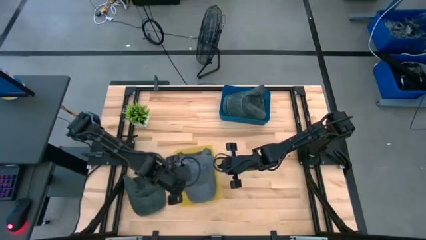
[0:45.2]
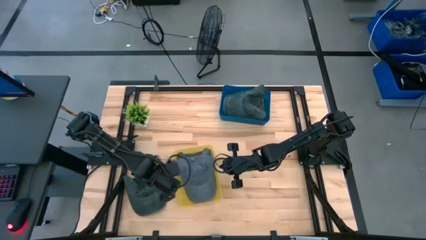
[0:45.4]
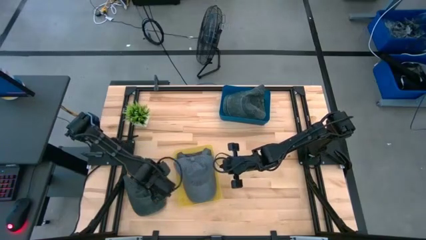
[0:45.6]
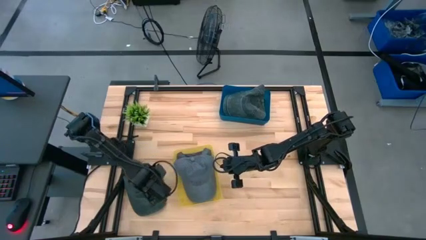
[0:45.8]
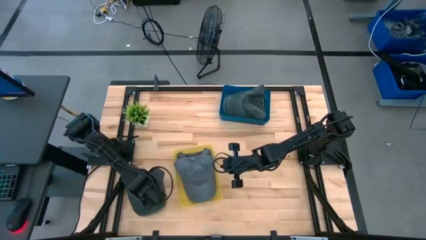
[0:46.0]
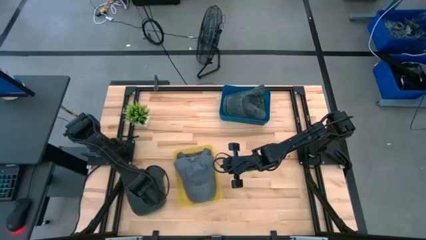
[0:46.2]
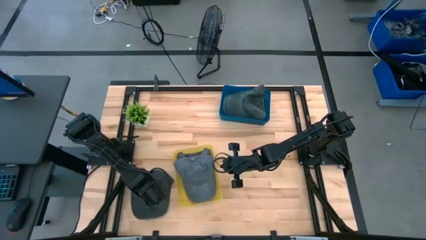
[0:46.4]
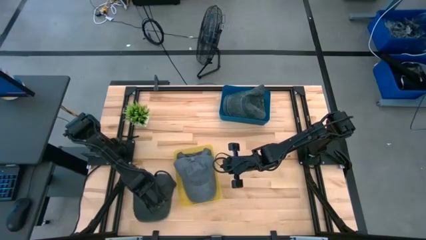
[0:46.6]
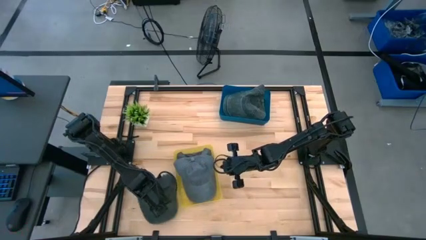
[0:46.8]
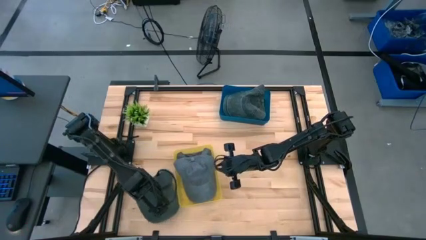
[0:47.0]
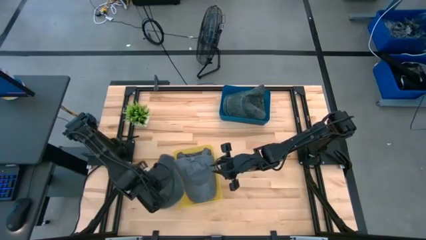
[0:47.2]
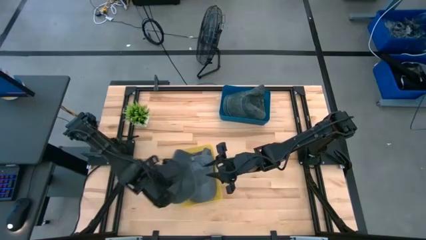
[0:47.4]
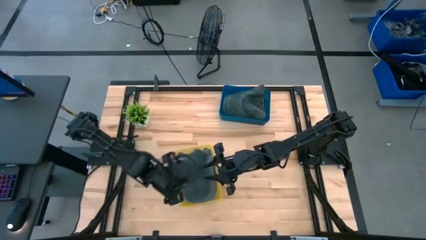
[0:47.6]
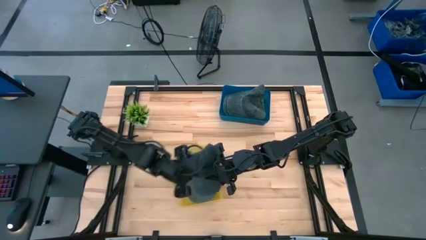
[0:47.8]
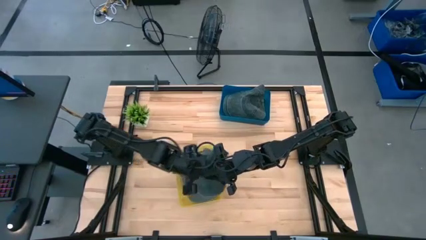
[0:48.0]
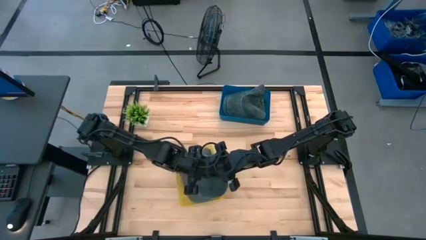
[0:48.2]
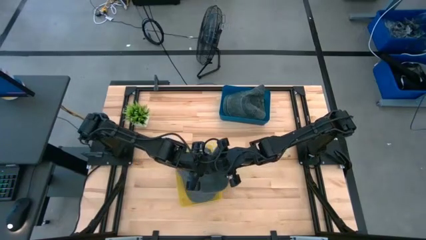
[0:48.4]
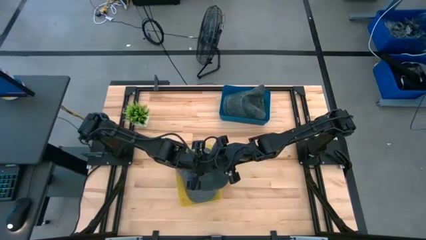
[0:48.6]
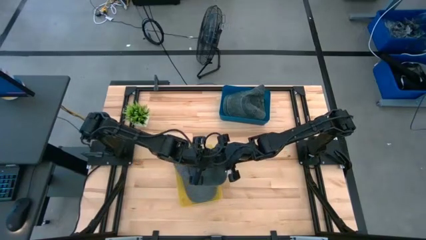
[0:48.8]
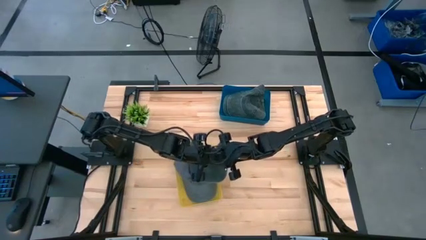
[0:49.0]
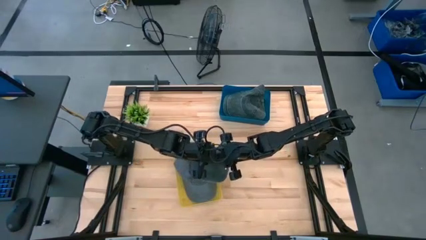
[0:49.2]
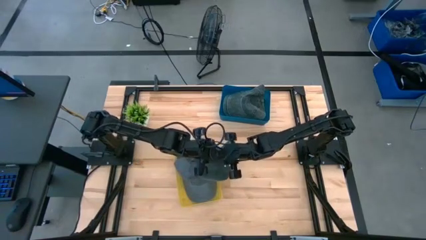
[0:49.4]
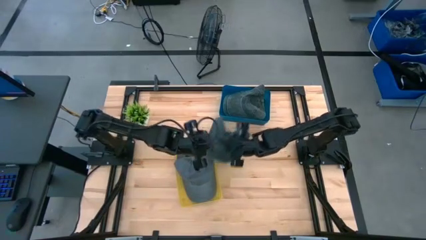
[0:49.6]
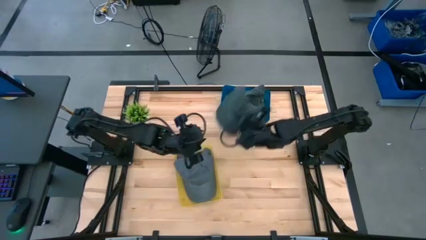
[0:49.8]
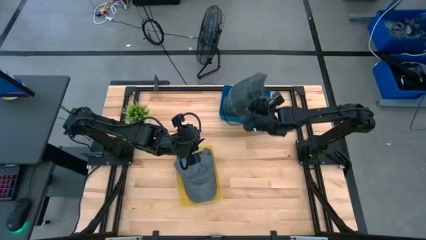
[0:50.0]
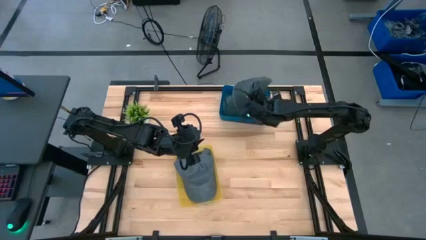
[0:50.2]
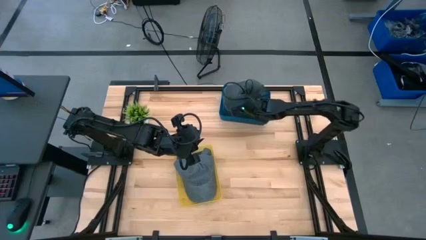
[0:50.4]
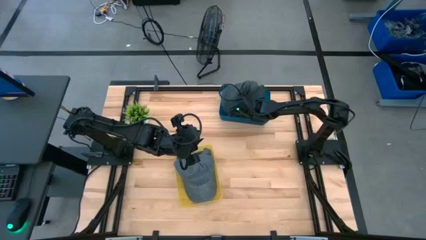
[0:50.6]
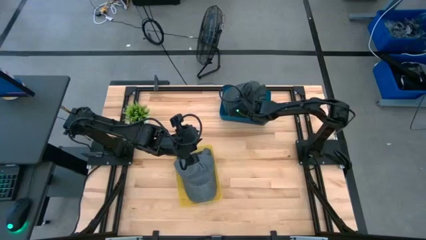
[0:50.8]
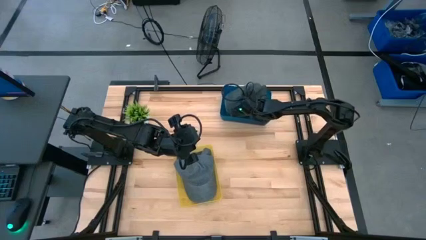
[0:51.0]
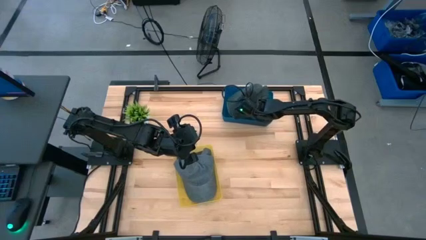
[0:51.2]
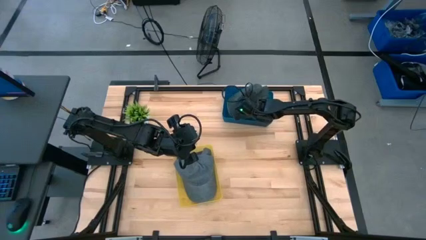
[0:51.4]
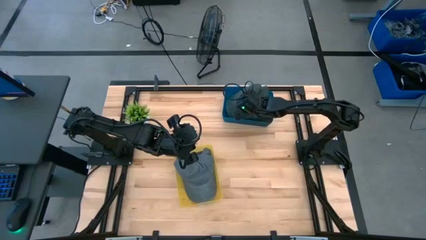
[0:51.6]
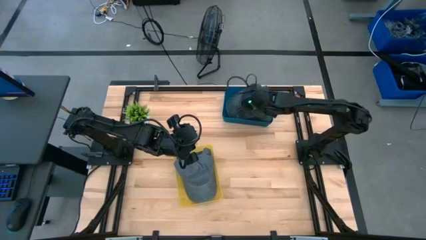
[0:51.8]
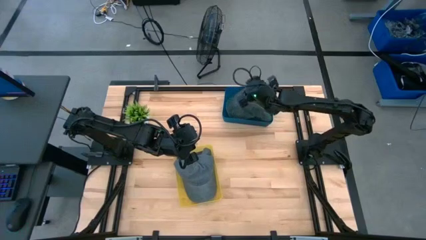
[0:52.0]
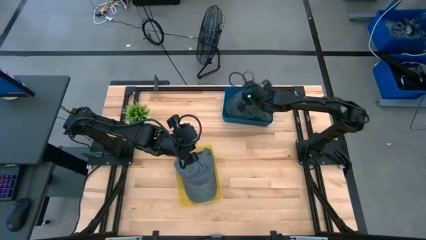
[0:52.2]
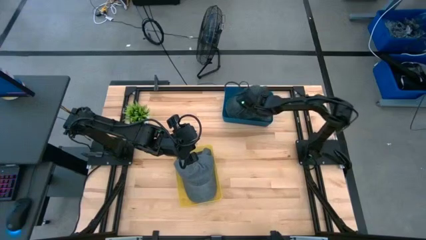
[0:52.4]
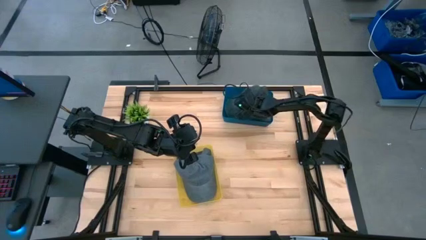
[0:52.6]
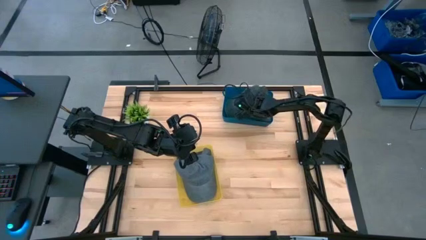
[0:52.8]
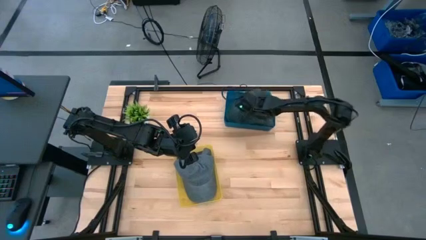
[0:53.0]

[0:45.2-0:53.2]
Task: Pick & Place hat
Put the dark gray cap into the blue bin

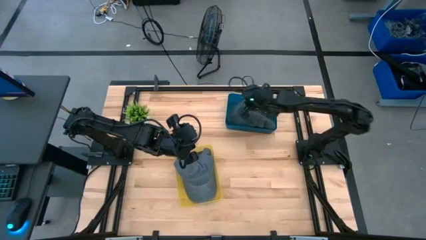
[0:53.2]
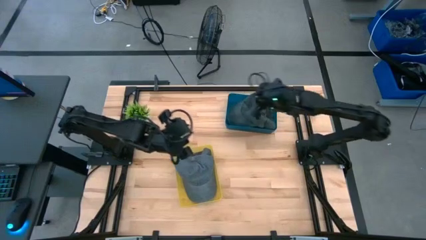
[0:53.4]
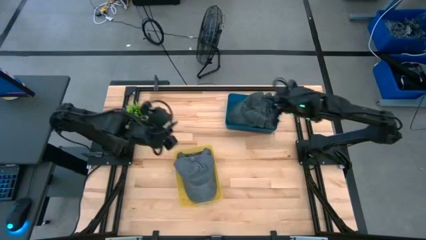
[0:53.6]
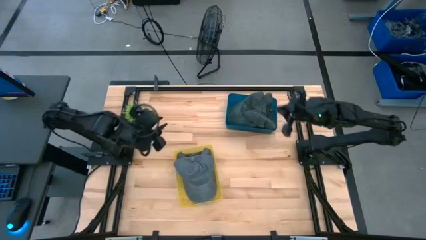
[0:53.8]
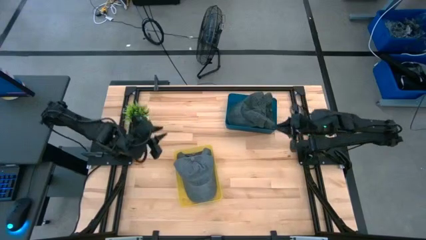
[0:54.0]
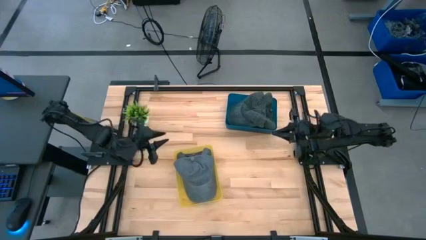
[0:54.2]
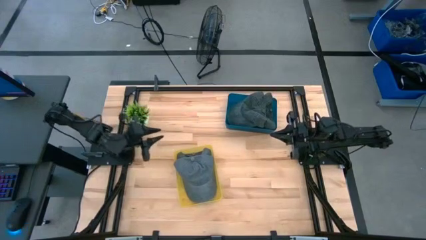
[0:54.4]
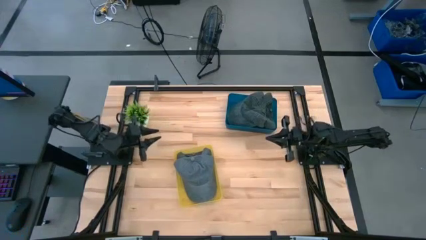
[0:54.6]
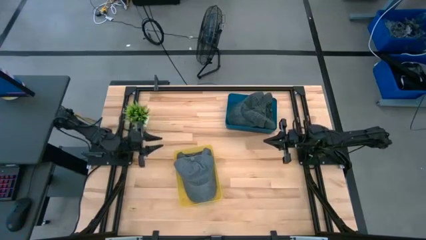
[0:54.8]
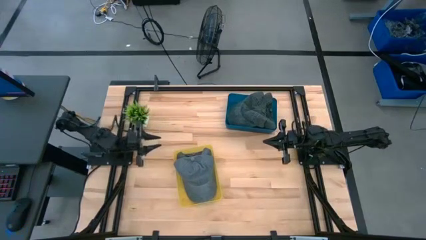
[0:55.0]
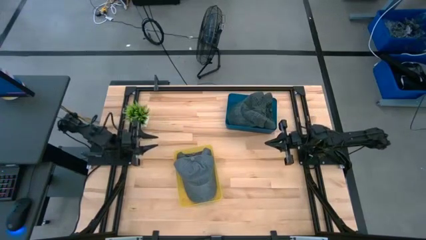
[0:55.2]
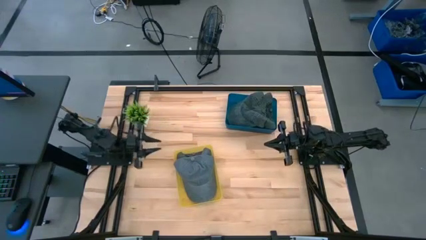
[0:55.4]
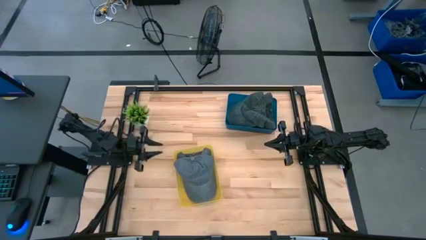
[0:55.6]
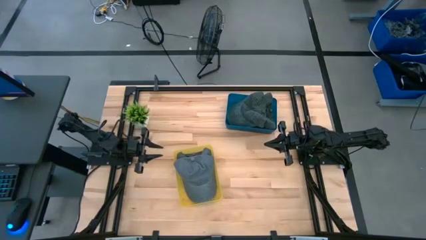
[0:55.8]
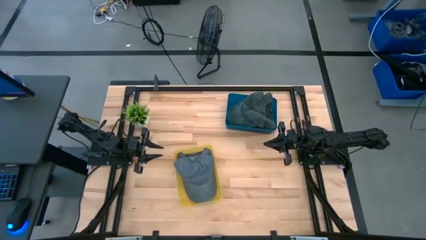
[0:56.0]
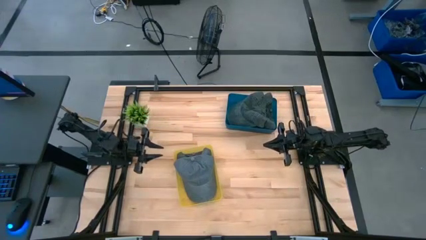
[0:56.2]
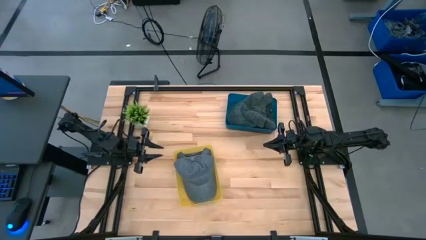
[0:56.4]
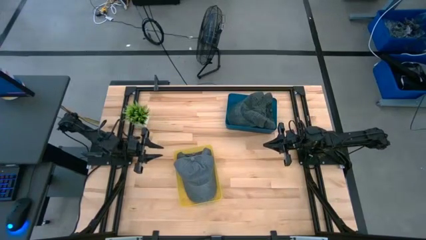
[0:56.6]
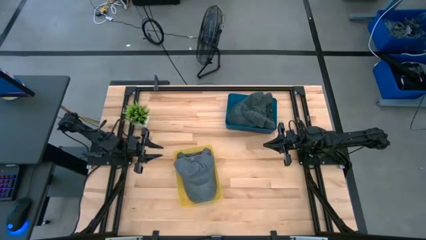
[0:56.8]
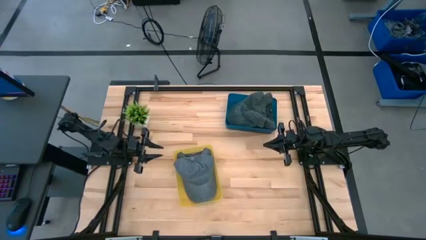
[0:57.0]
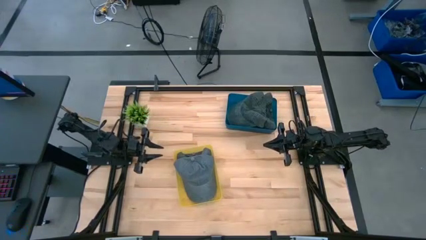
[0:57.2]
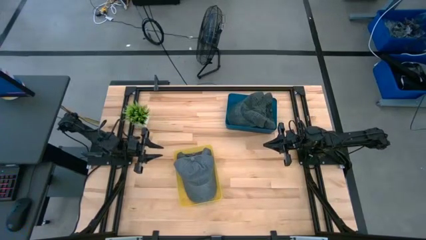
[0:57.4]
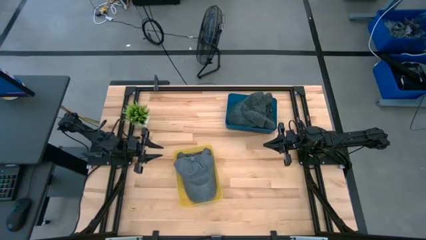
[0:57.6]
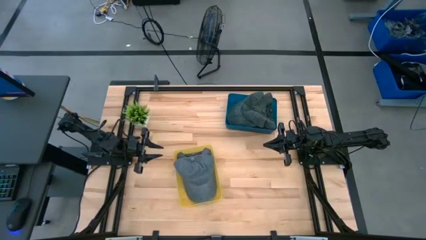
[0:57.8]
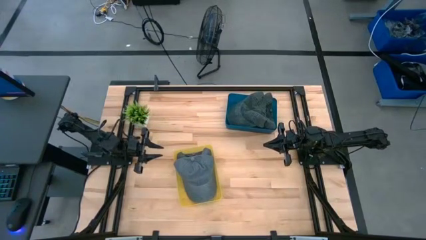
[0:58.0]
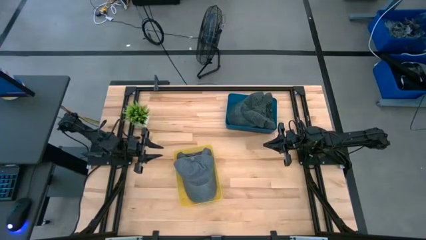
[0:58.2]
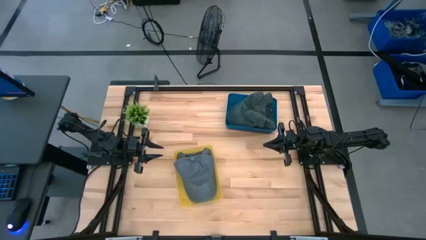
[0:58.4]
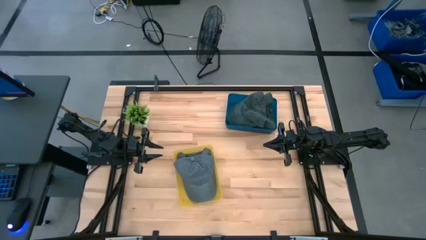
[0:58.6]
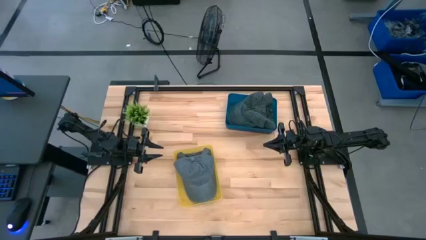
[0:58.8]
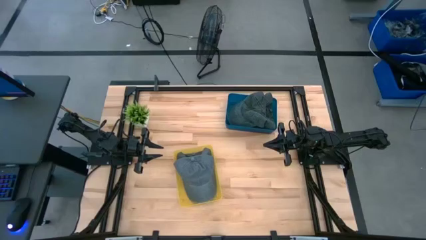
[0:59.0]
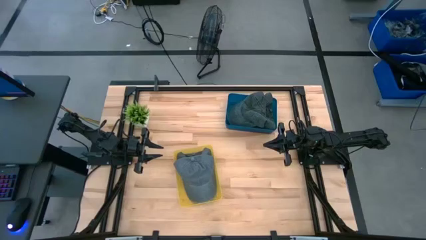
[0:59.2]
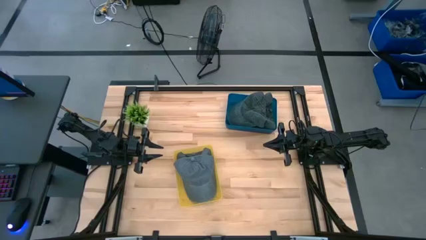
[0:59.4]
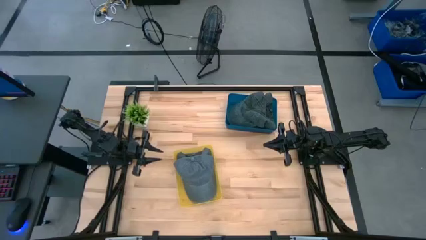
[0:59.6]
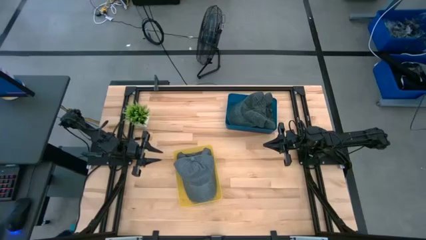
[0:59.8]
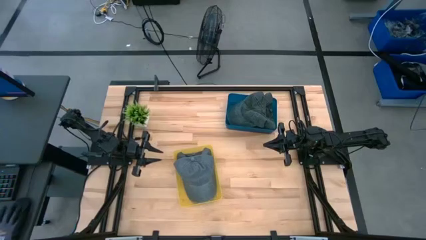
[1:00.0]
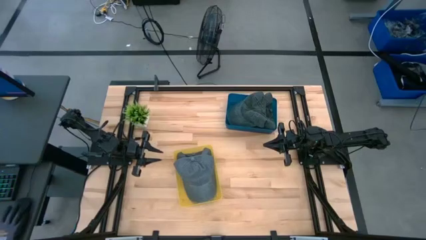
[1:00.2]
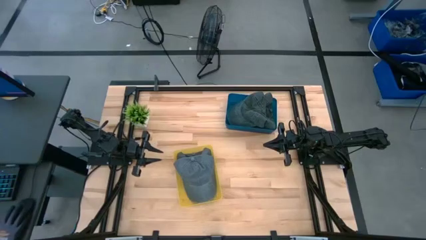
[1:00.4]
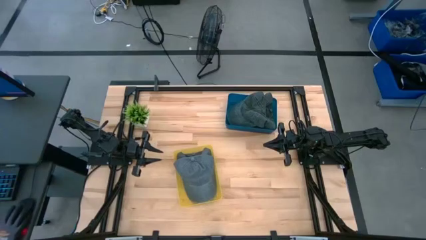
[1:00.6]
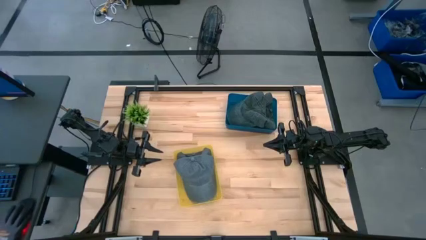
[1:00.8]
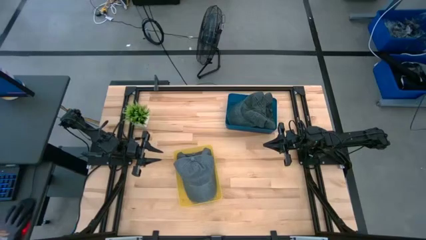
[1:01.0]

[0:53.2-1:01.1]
Return to Home Position
